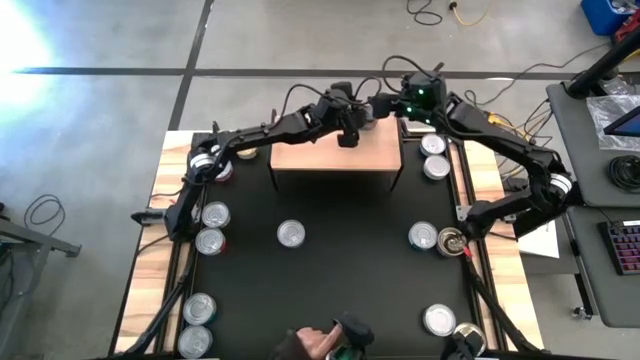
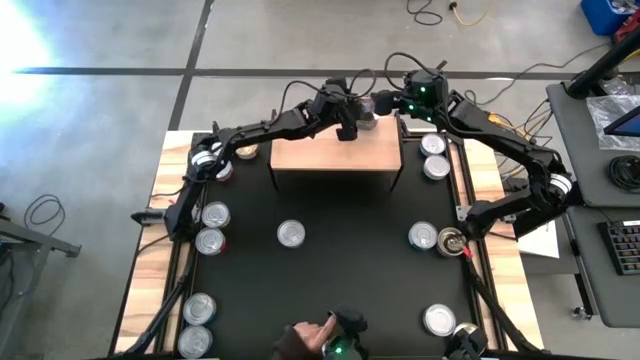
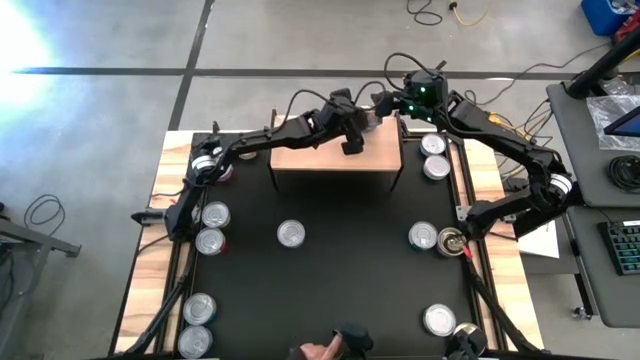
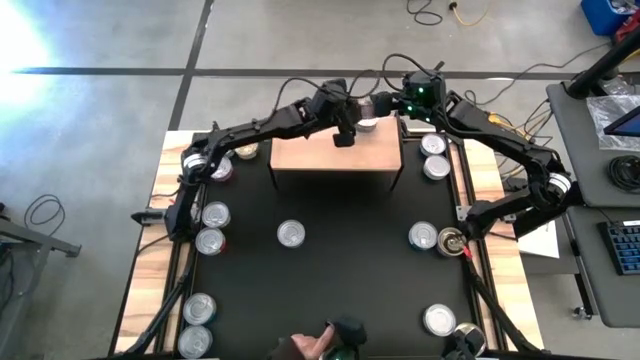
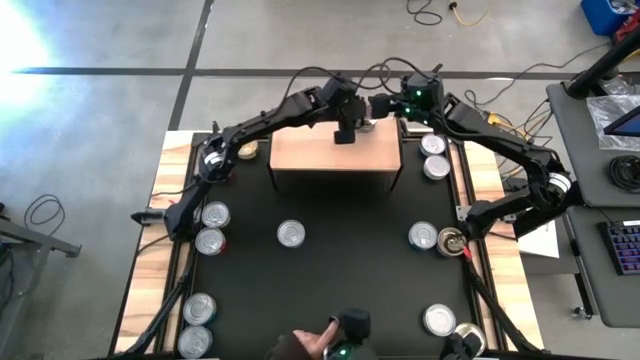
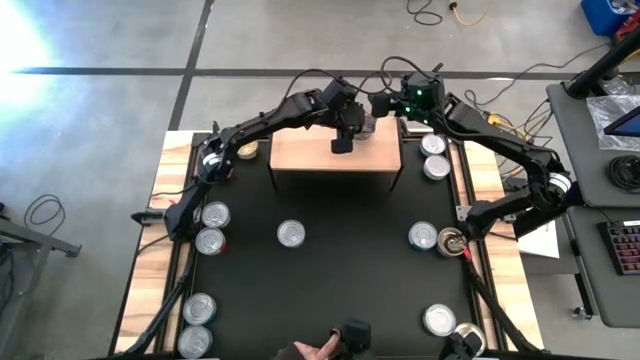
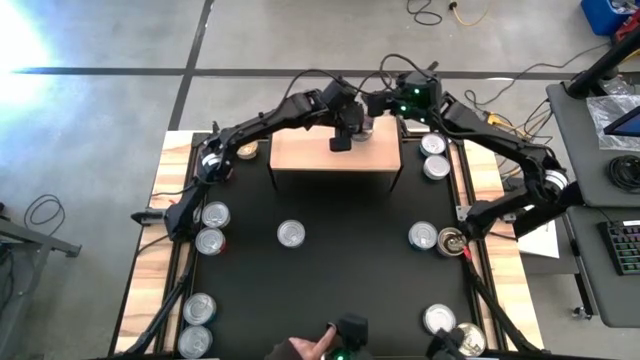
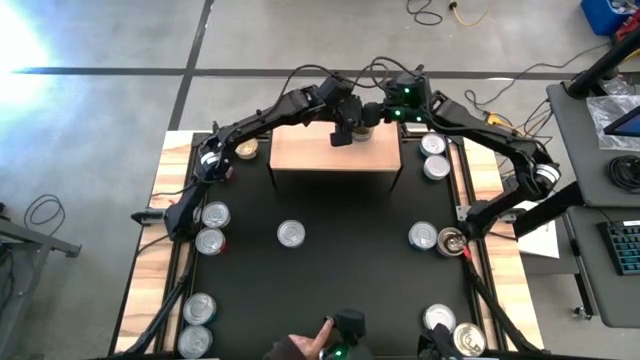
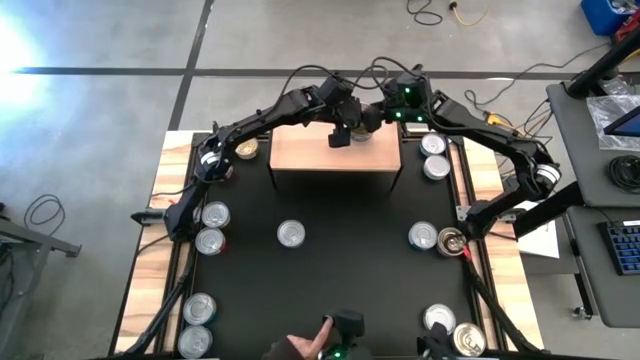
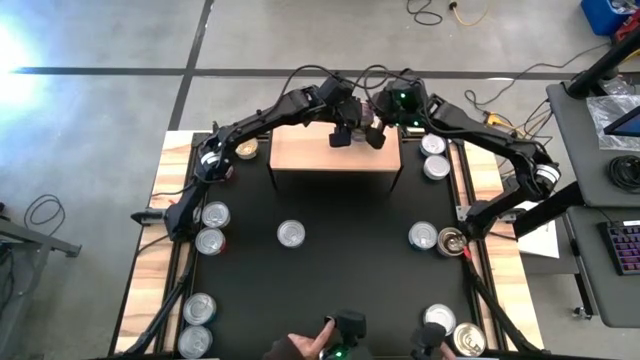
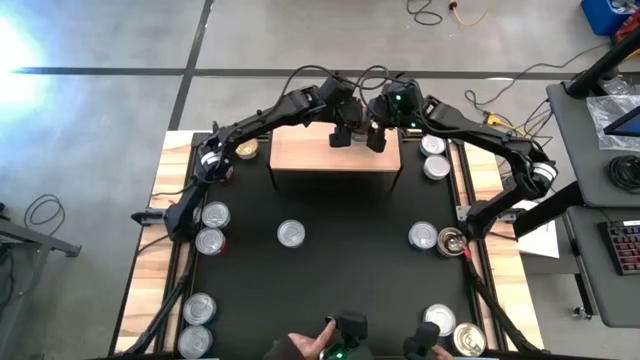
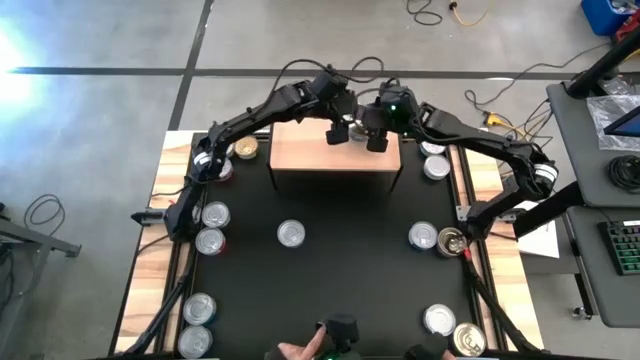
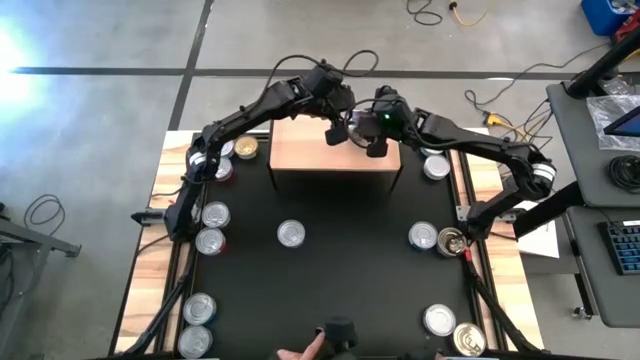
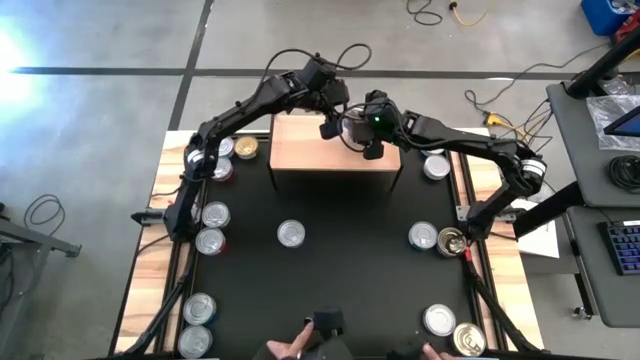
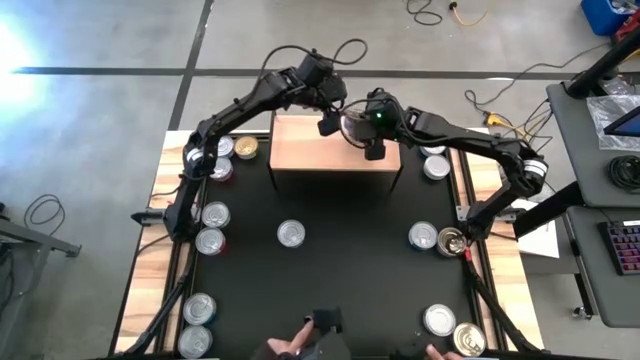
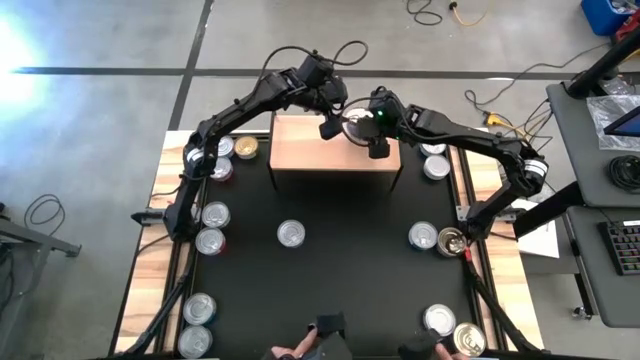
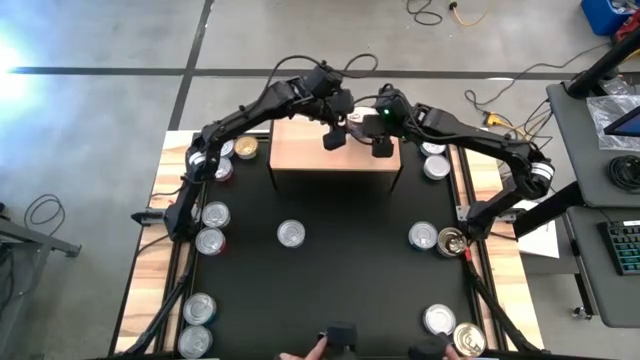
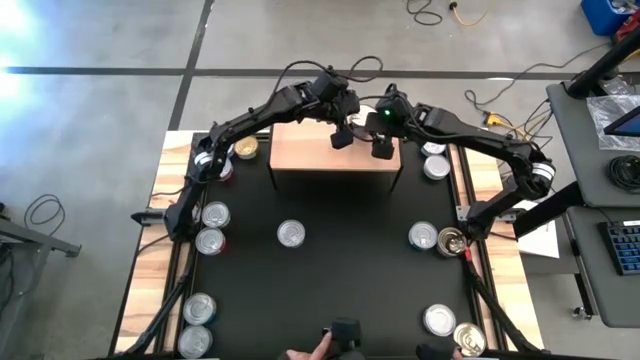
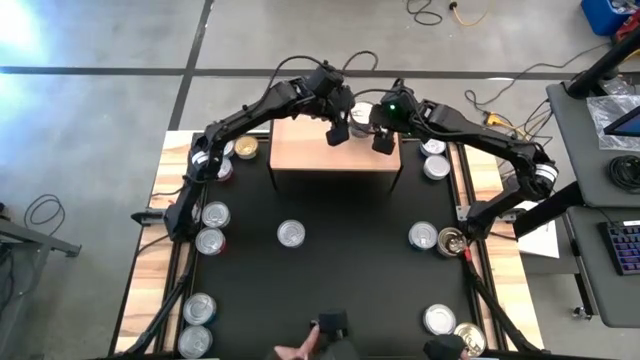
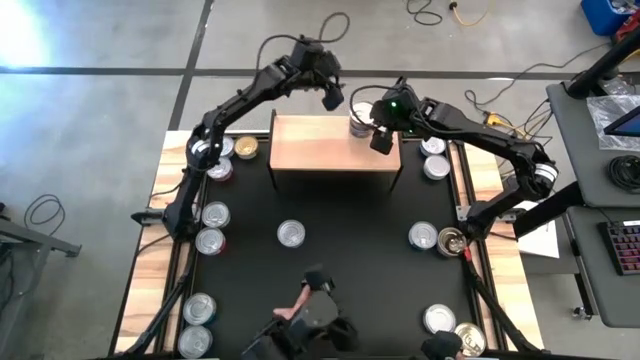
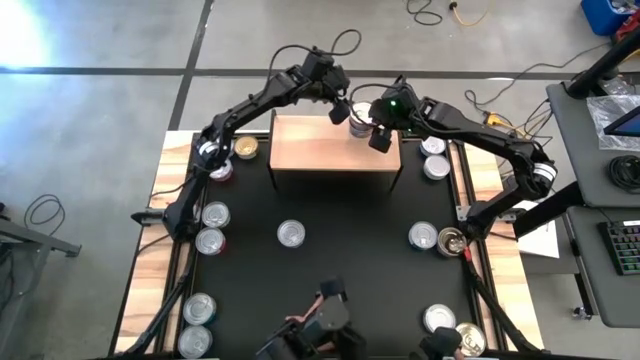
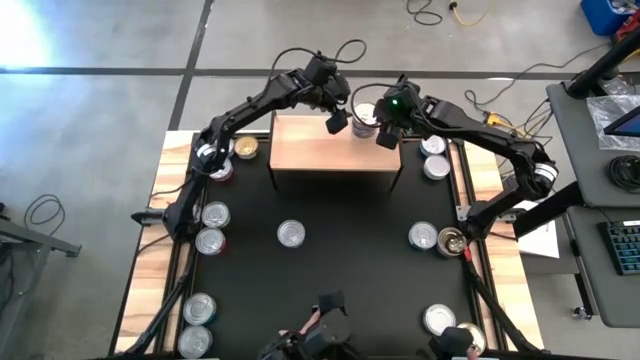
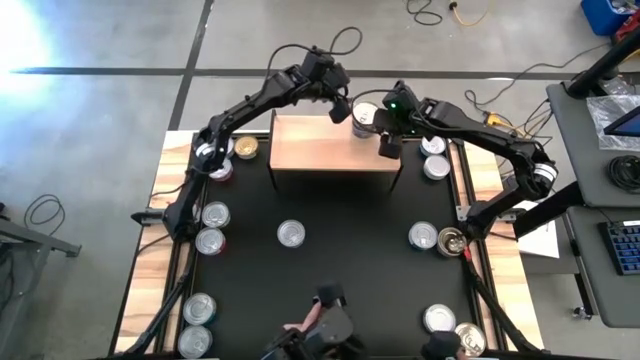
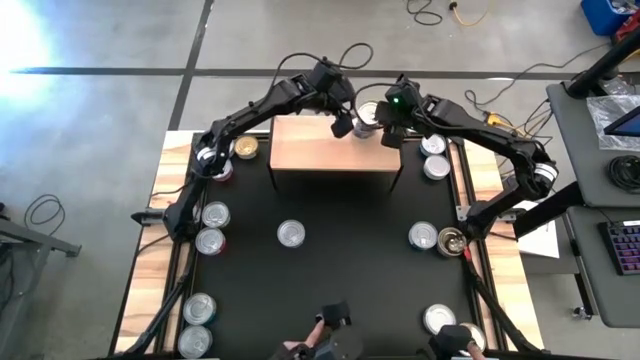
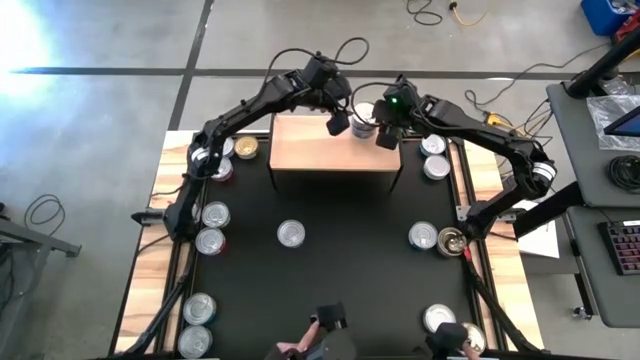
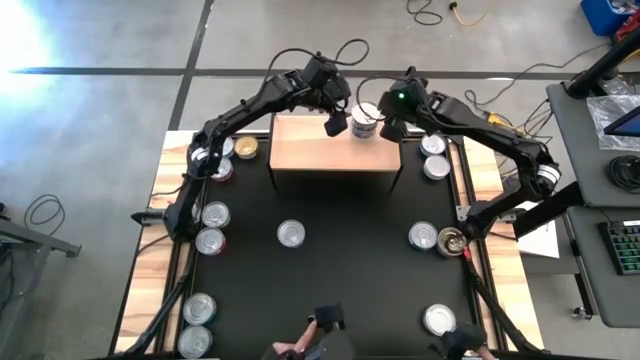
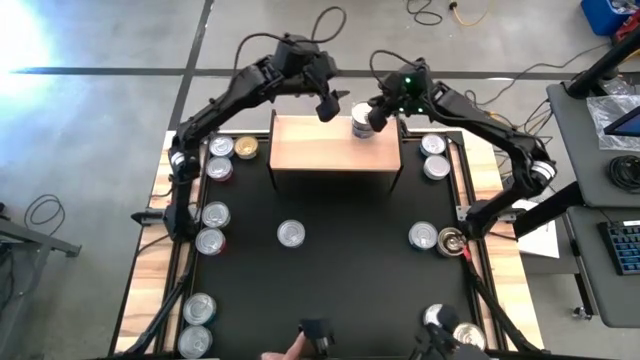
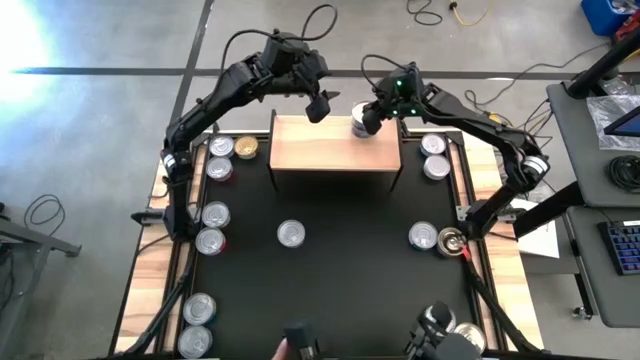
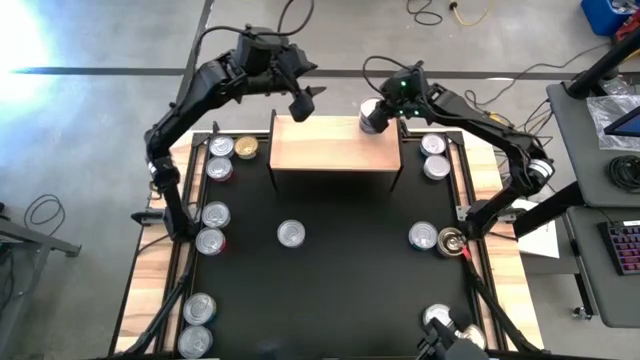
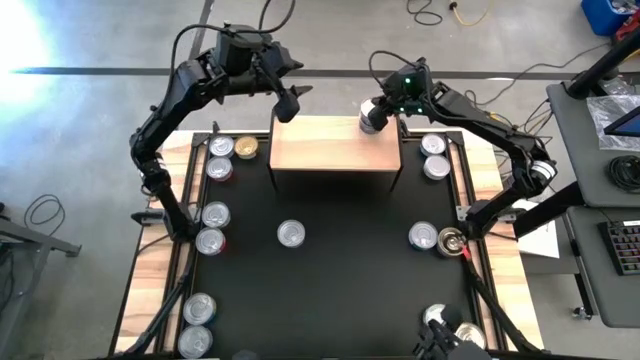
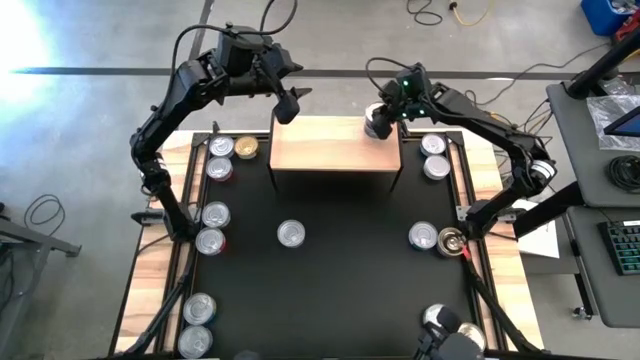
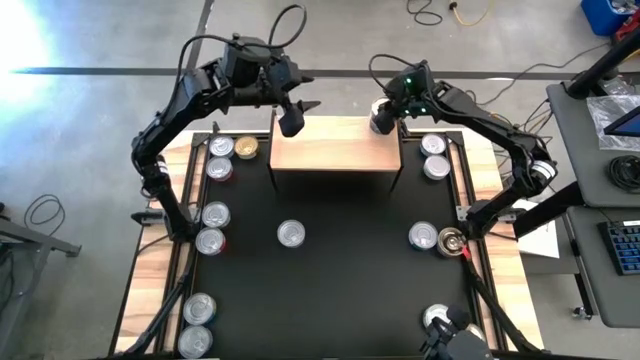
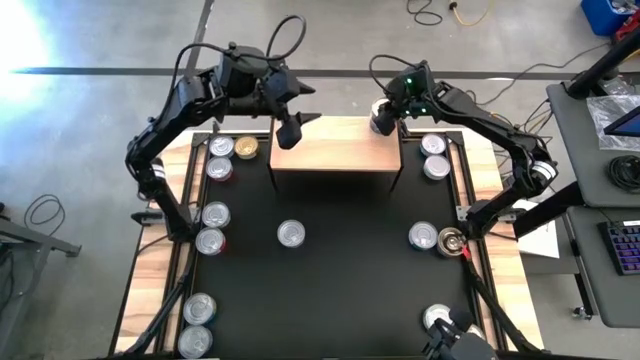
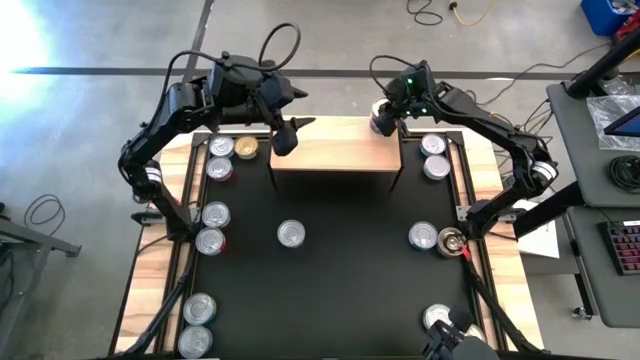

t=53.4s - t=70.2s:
Task: Stack canned seafood by type on shelf
Stack the top blue and pink tuna can on top of the blue and pink tuna can

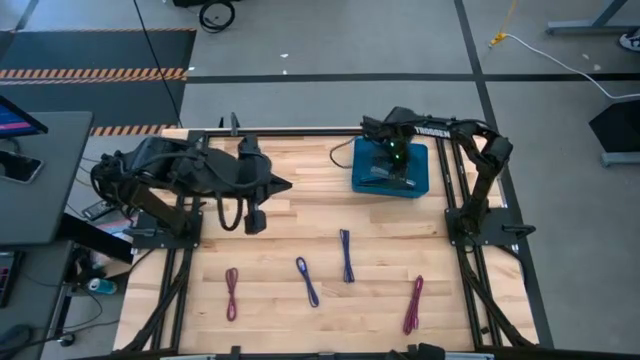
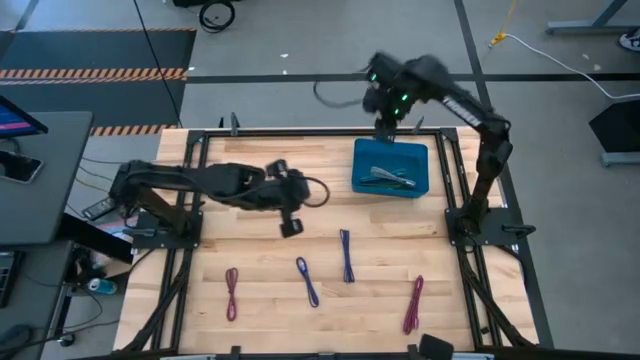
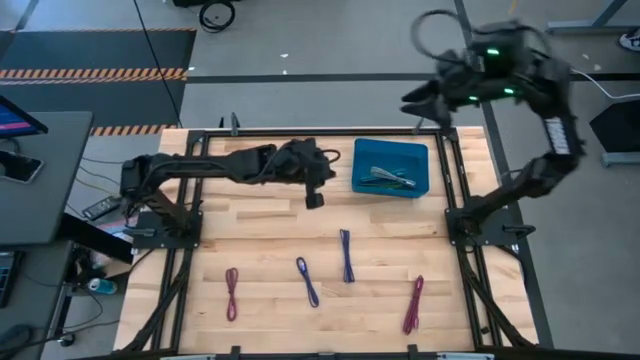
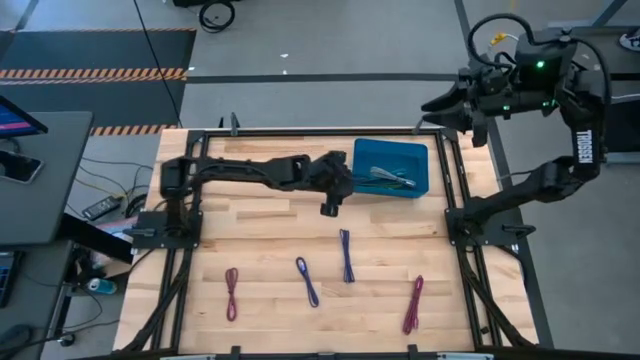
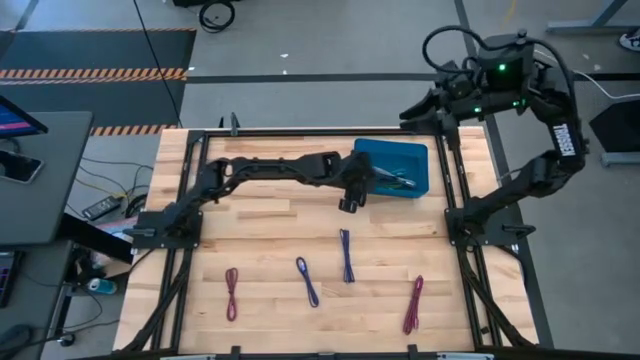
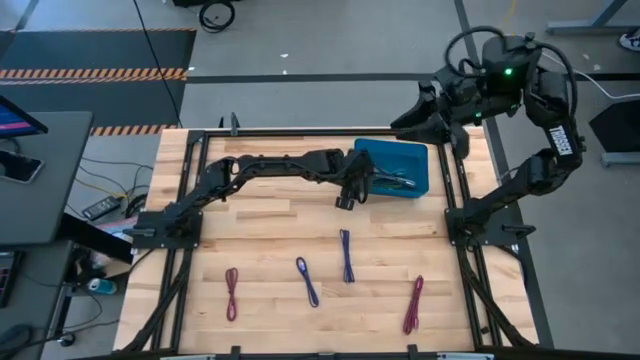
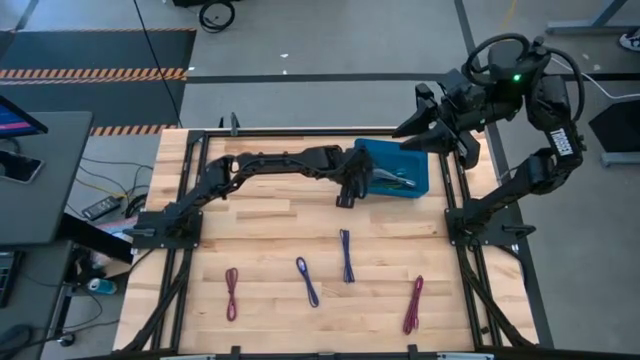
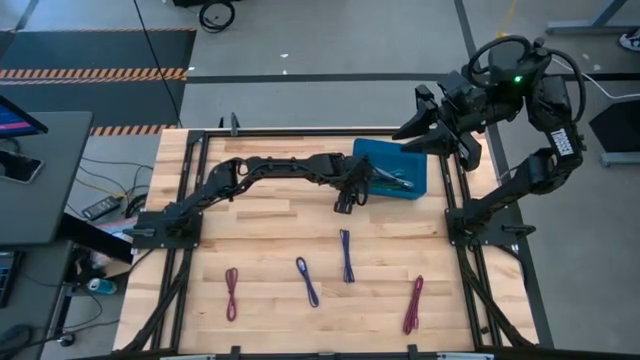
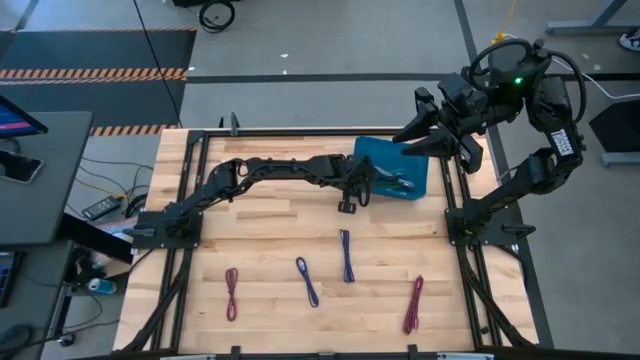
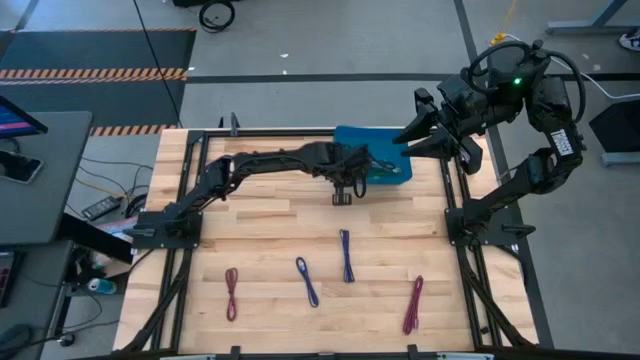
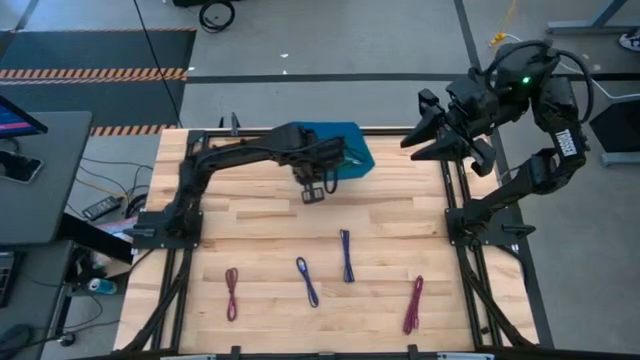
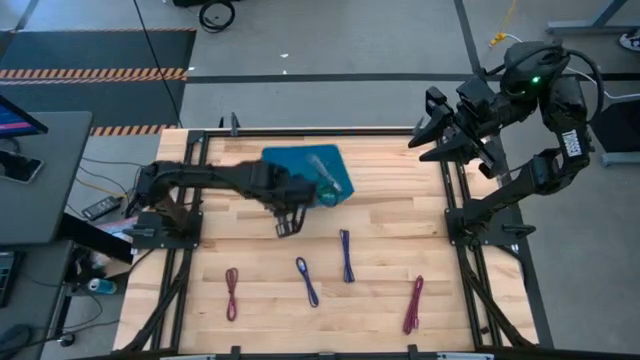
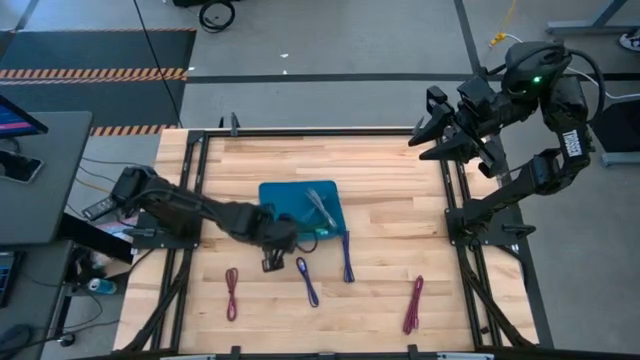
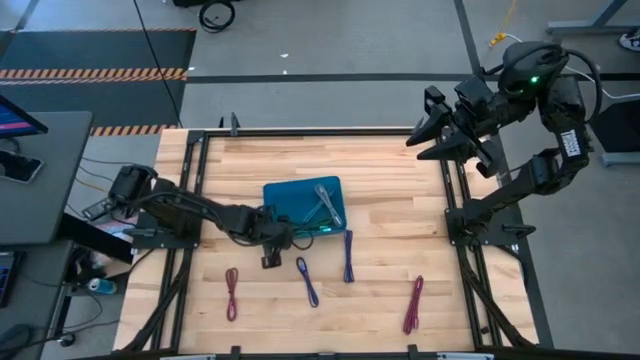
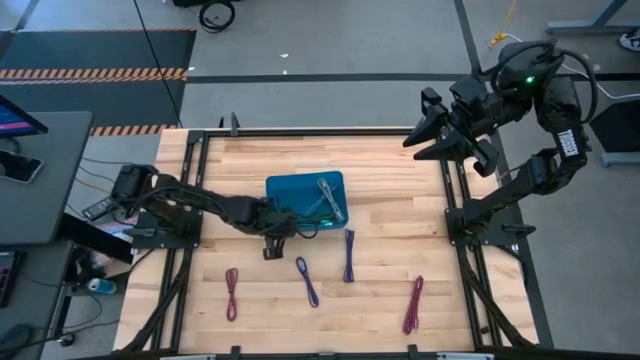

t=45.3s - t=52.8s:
Task: Pick and place USB-C Cables
Move the blue bin to the center of the table
